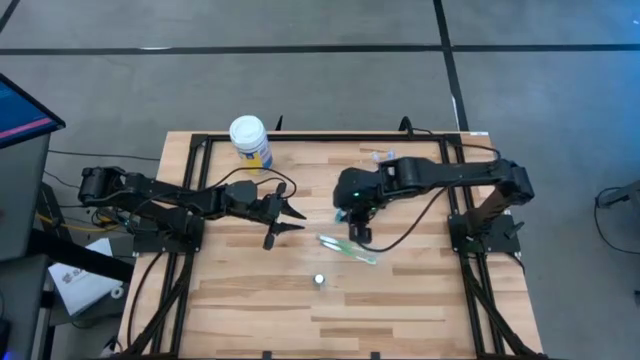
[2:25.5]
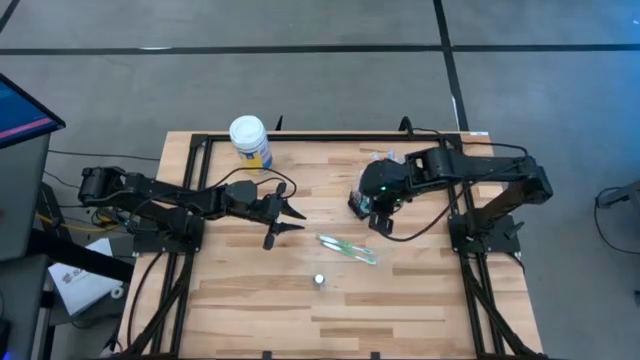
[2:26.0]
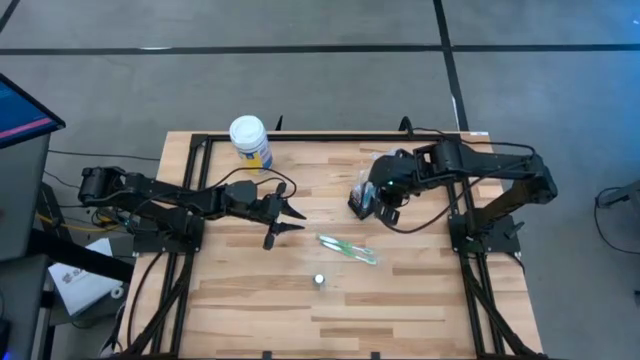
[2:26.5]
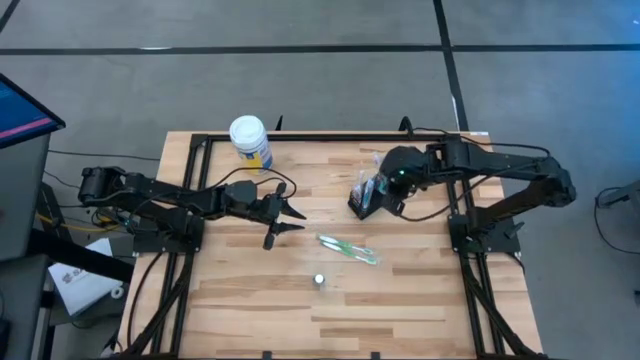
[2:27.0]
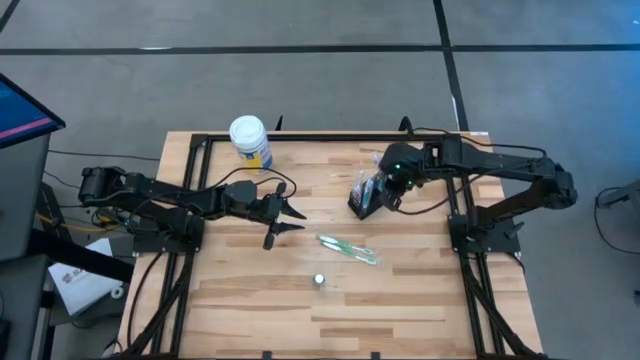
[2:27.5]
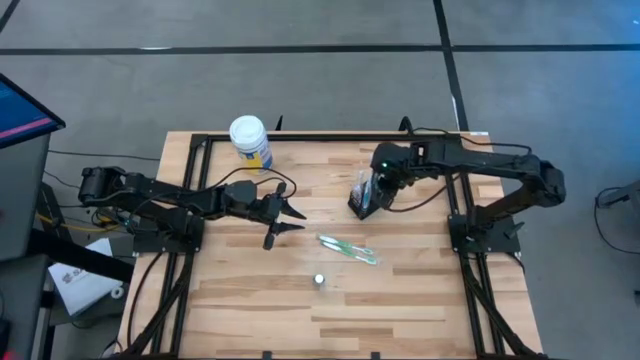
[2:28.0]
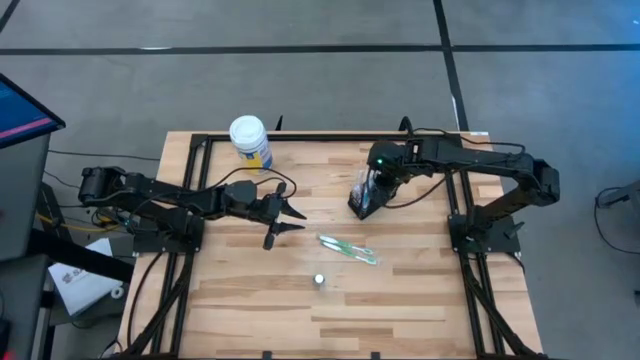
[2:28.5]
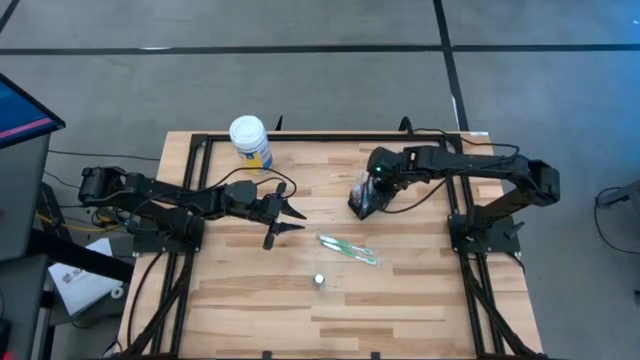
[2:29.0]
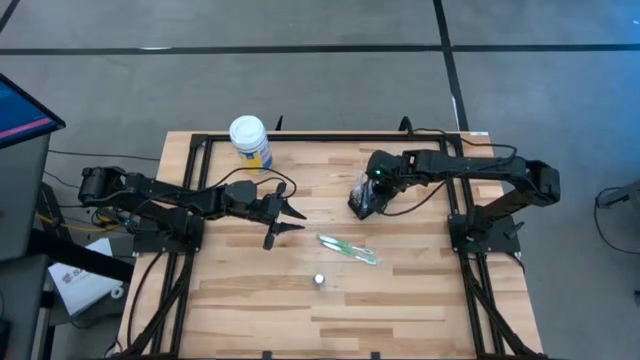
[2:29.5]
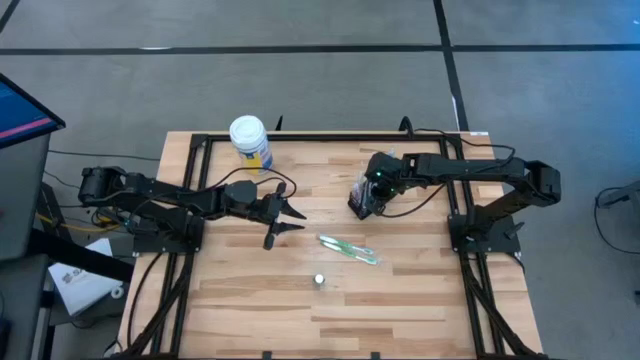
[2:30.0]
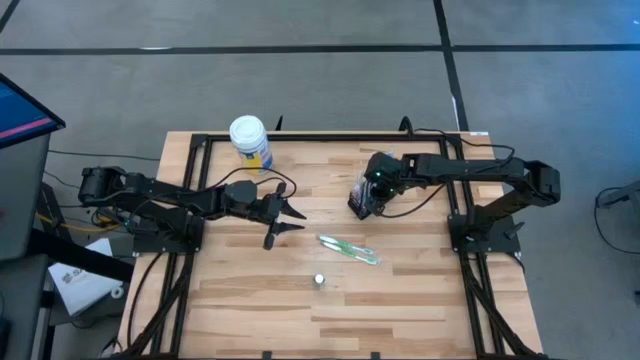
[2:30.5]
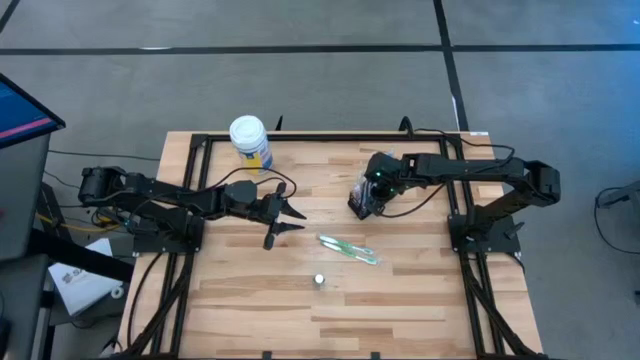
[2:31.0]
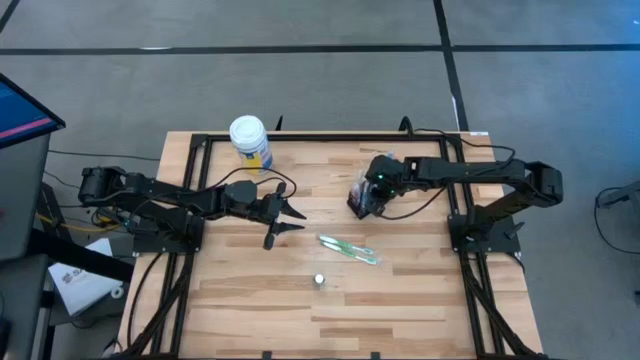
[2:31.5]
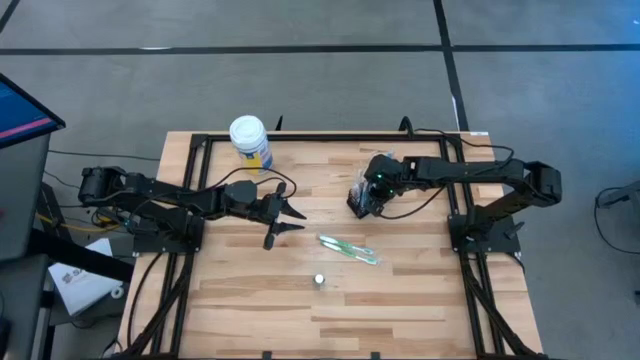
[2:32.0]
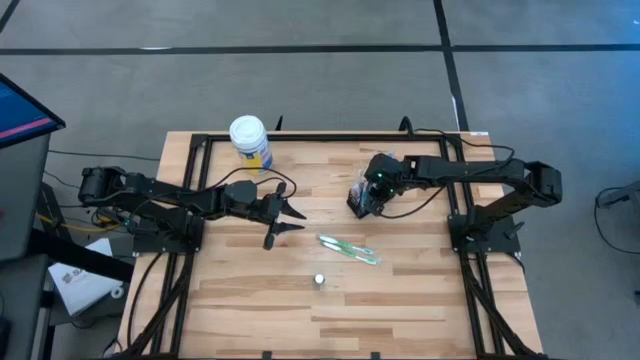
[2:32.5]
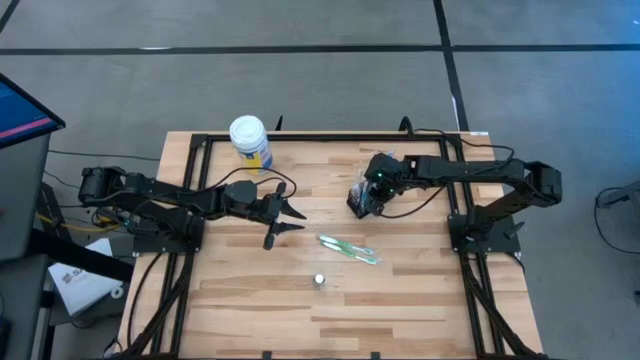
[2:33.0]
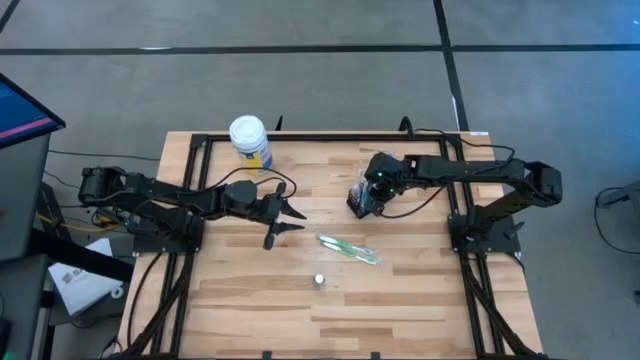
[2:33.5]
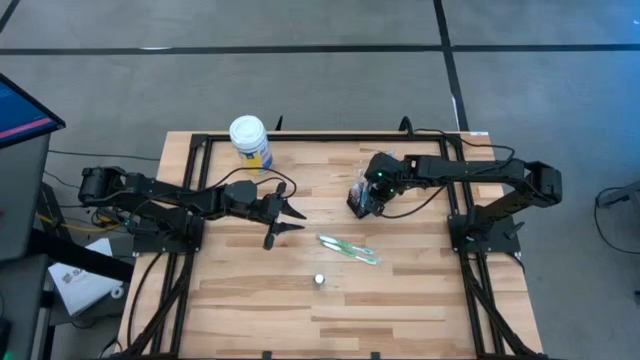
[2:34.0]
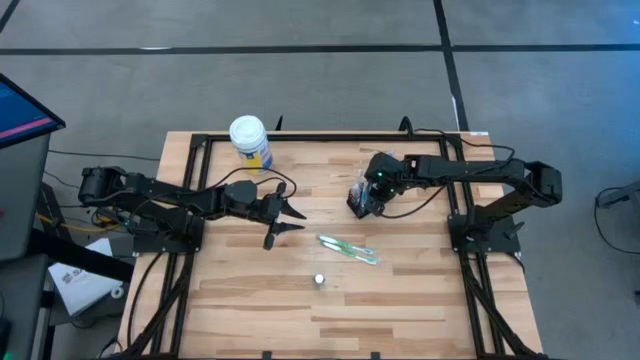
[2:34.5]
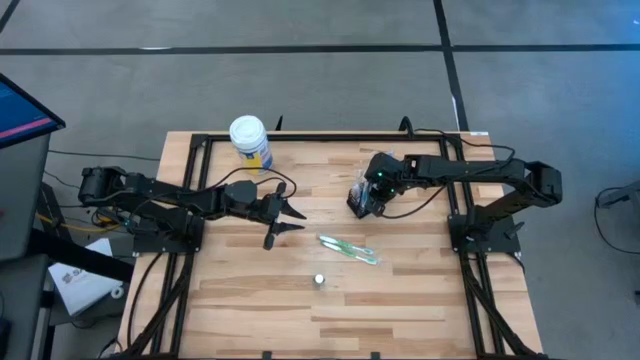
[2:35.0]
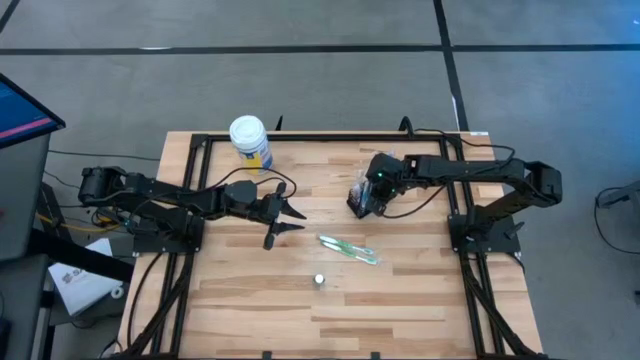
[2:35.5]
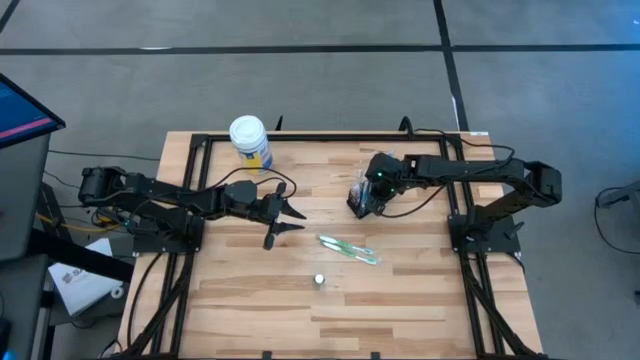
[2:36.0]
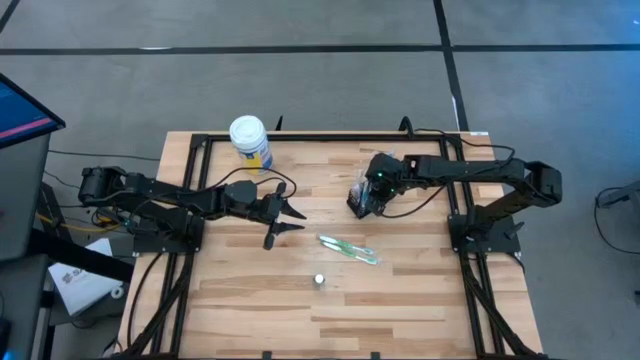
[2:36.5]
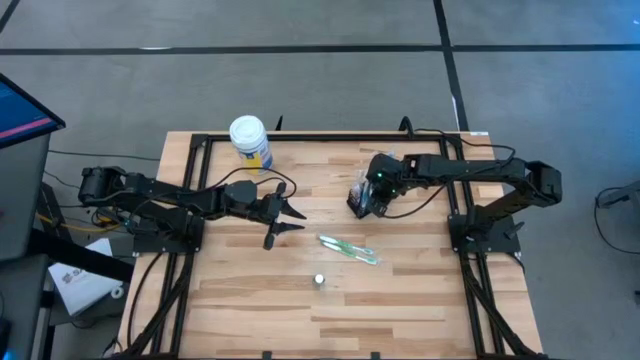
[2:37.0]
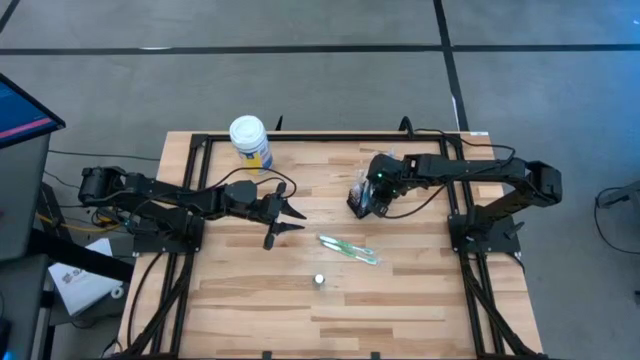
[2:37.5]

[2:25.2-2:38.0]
Task: Pick & Place toothbrushing station
Put the blue mouthwash into the mesh organizer

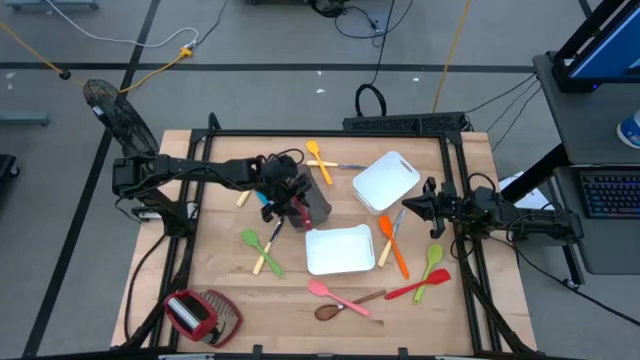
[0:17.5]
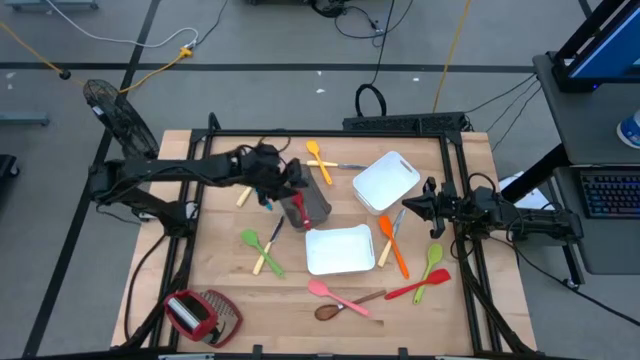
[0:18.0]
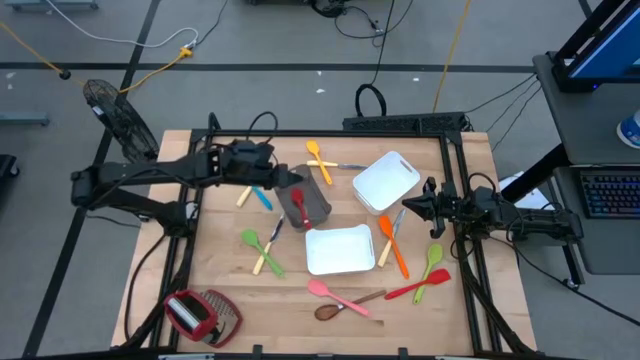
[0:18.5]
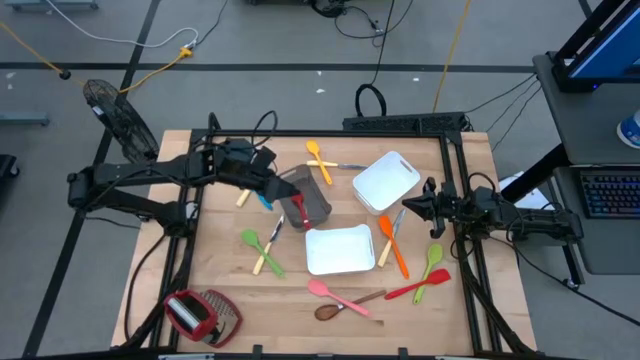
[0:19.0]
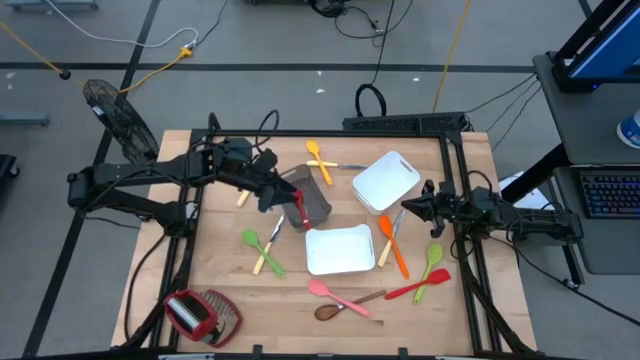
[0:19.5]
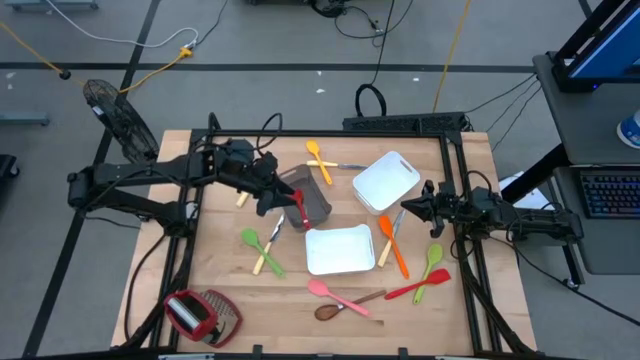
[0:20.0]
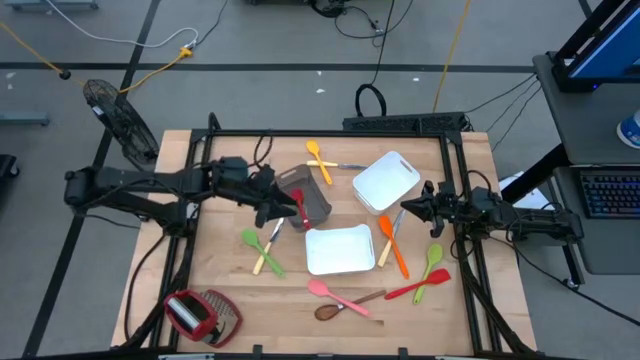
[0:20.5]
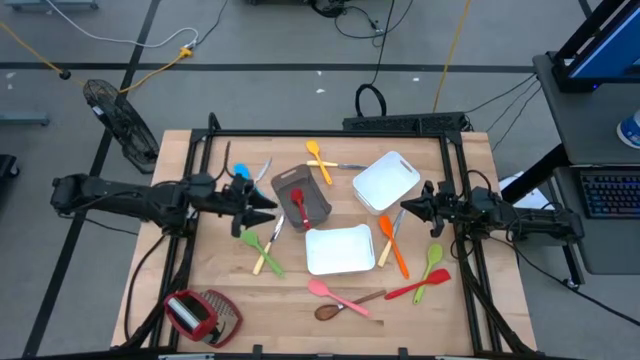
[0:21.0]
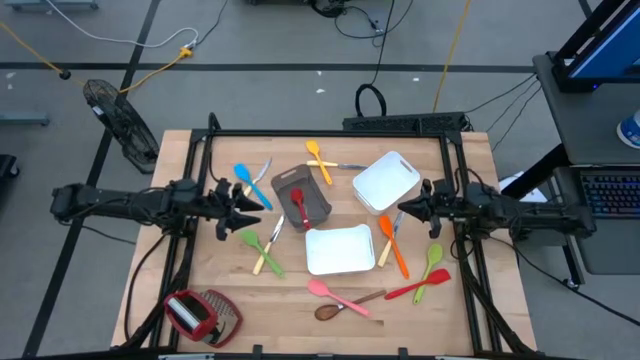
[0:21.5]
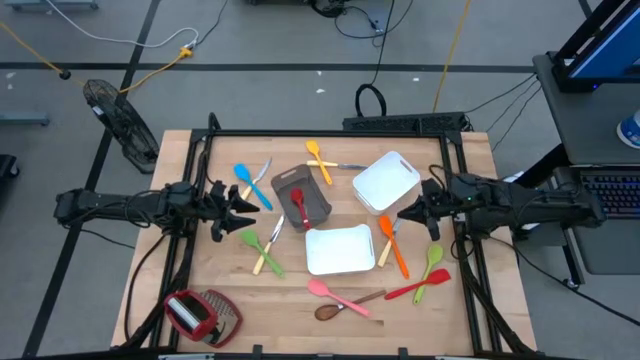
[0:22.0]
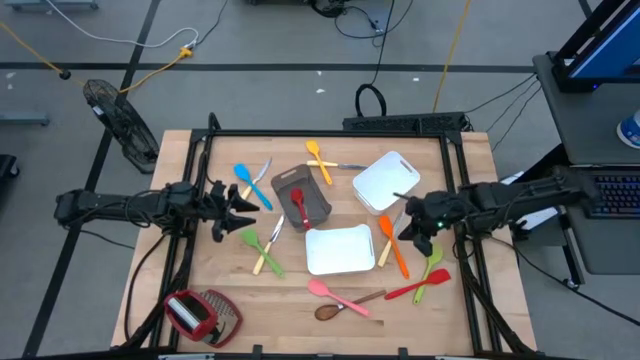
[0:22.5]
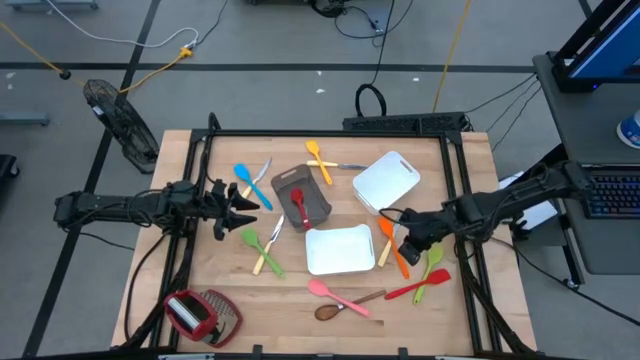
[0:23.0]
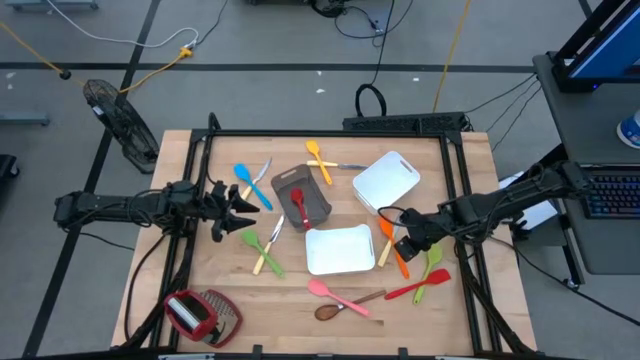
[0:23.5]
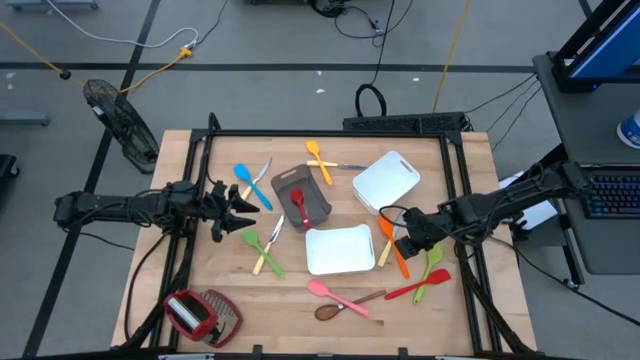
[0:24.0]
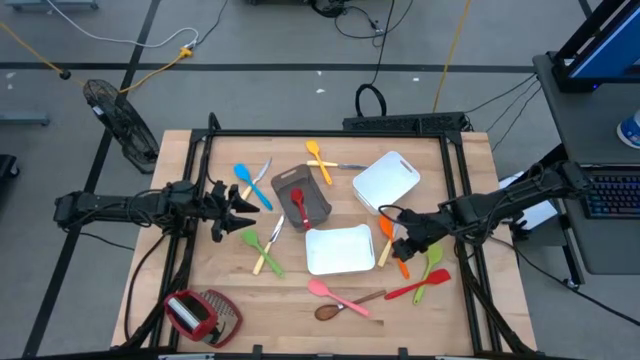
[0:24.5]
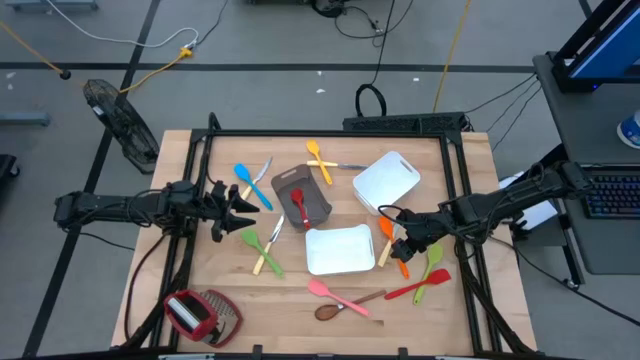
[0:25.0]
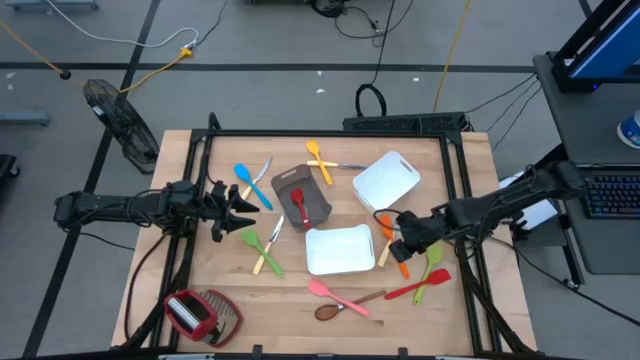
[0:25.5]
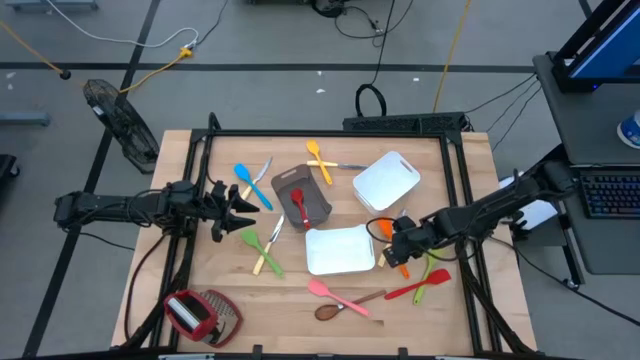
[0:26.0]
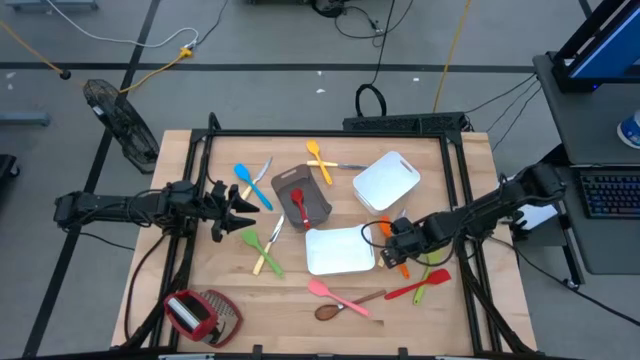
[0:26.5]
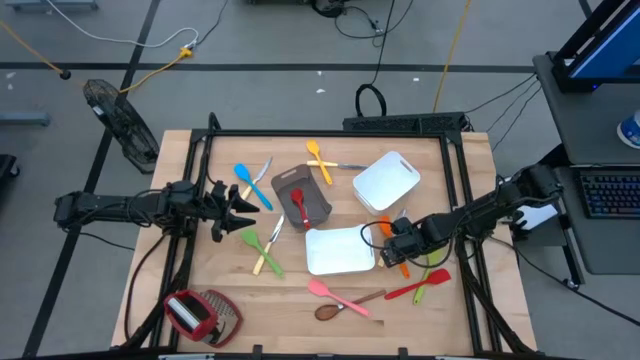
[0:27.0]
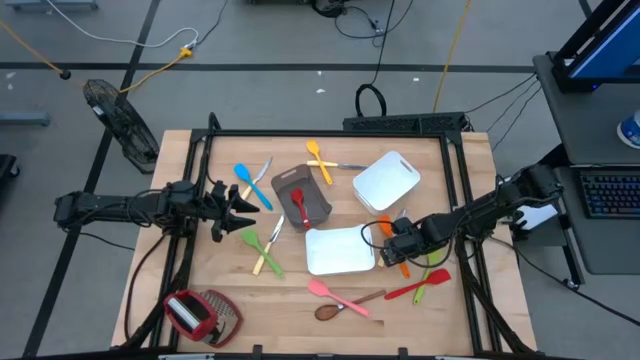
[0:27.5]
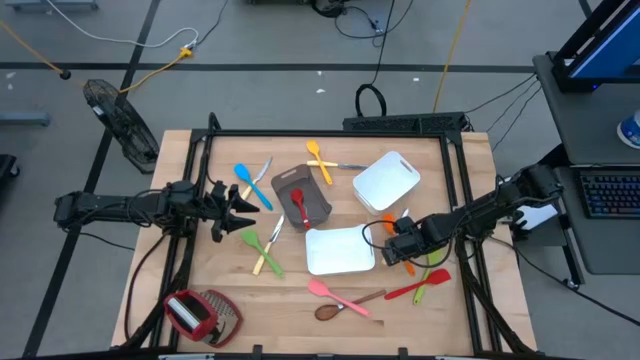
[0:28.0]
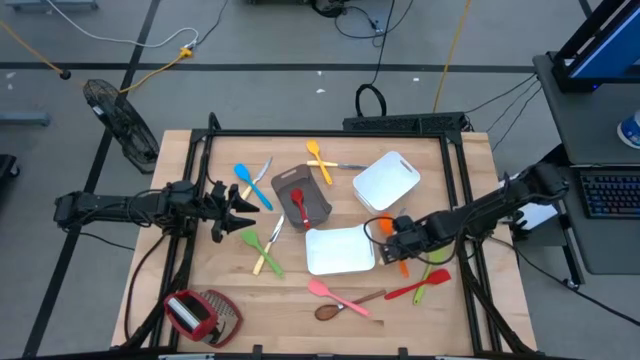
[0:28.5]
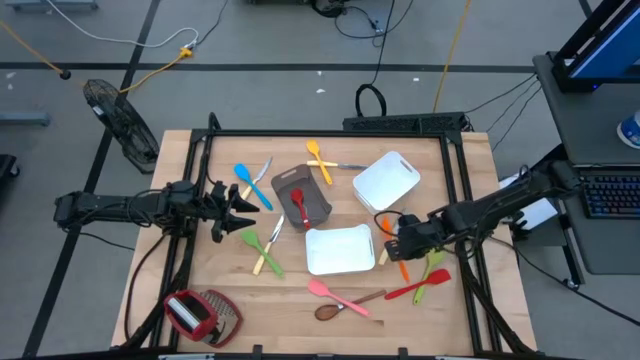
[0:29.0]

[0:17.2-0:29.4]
Task: Pick & Place Kitchen Items
Put the orange spatula into the top white bin
